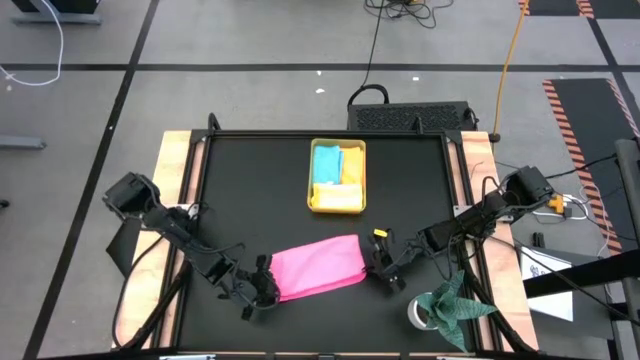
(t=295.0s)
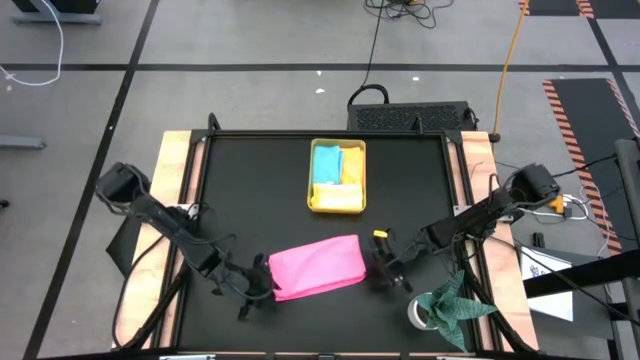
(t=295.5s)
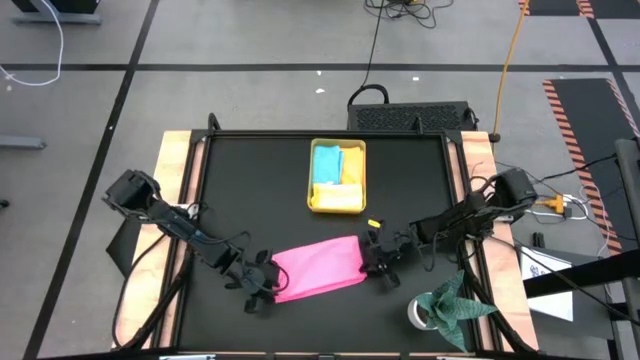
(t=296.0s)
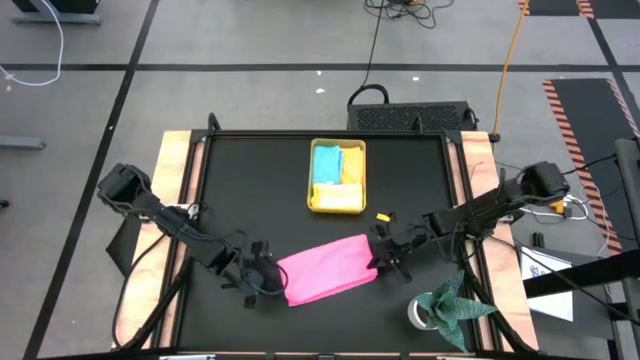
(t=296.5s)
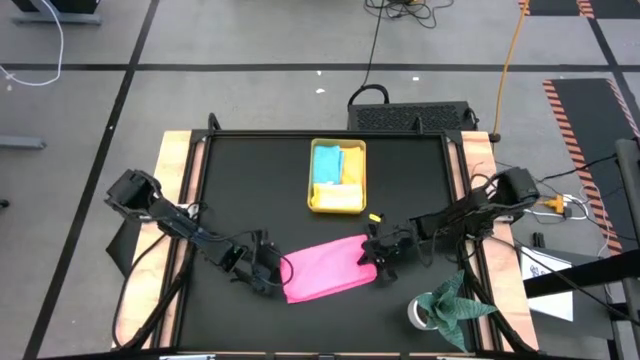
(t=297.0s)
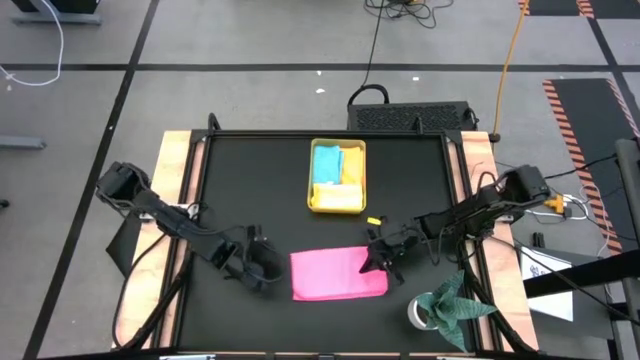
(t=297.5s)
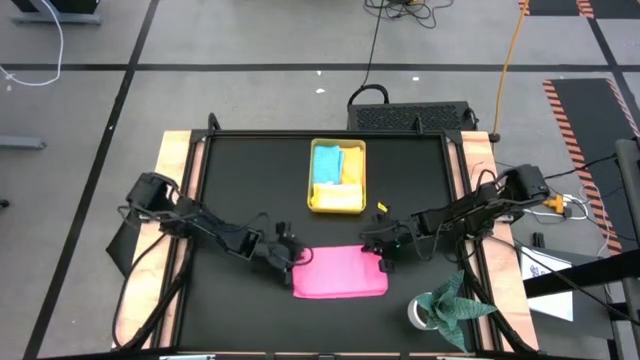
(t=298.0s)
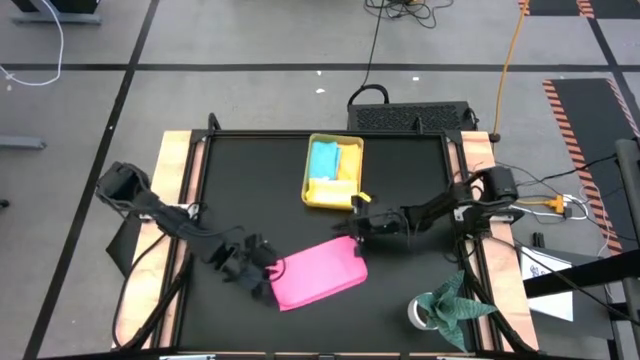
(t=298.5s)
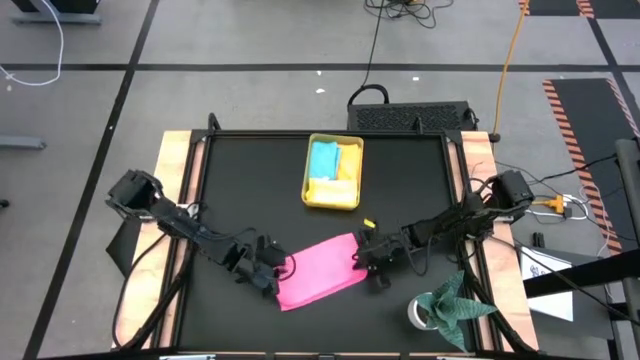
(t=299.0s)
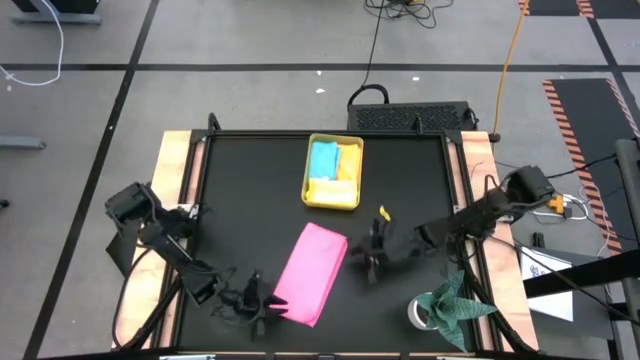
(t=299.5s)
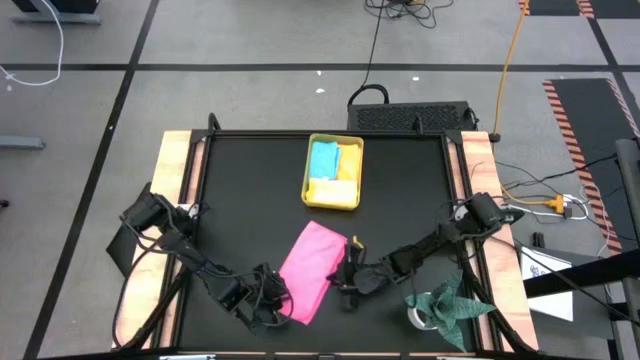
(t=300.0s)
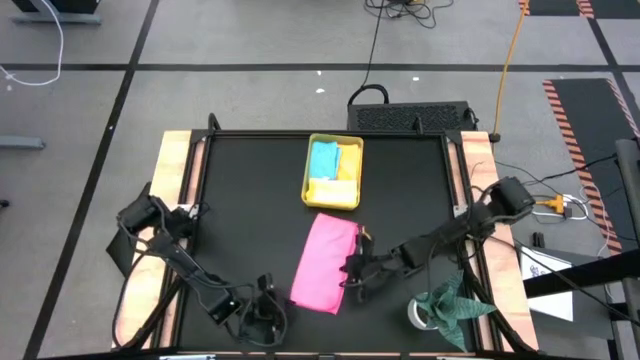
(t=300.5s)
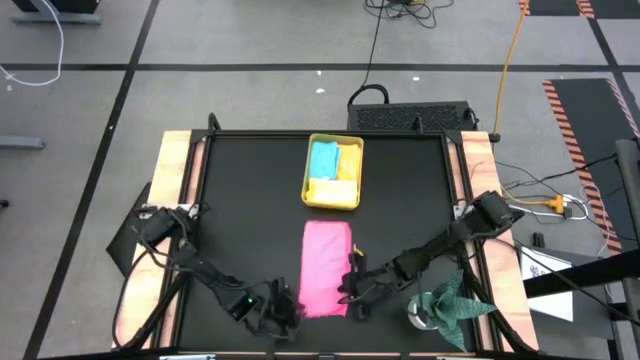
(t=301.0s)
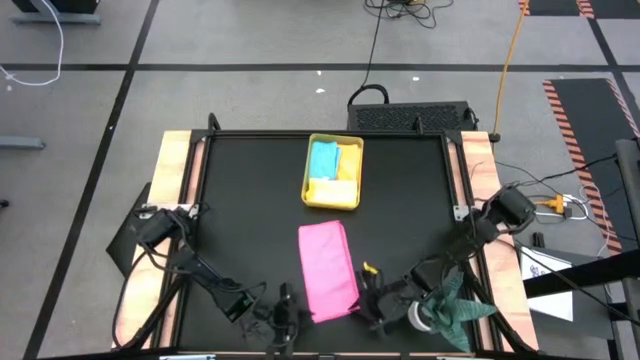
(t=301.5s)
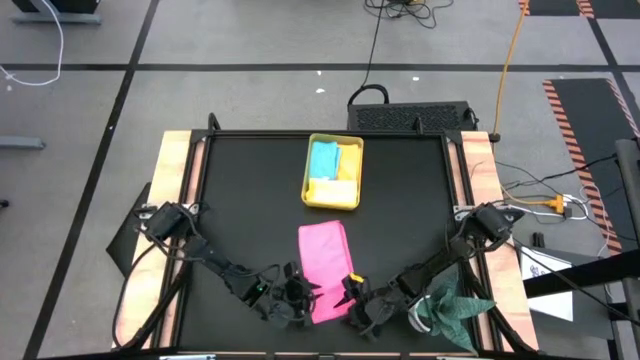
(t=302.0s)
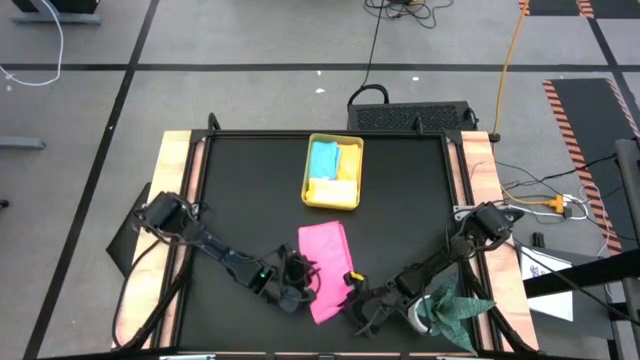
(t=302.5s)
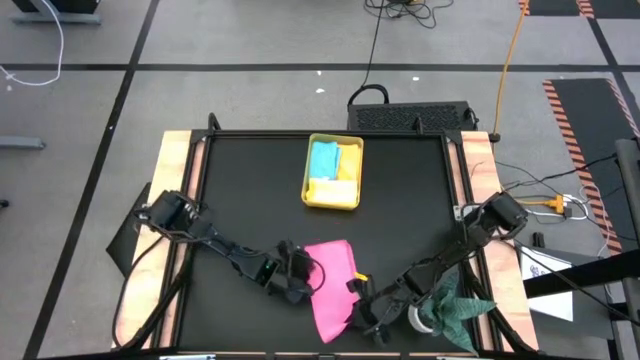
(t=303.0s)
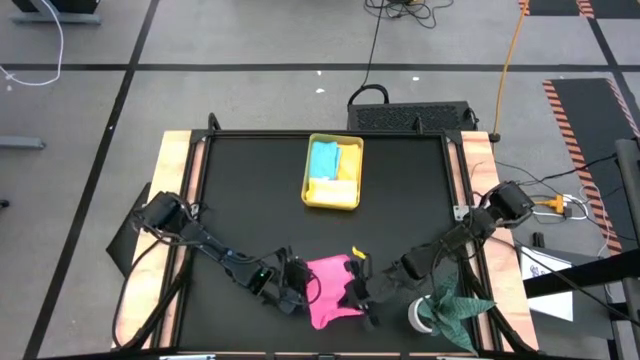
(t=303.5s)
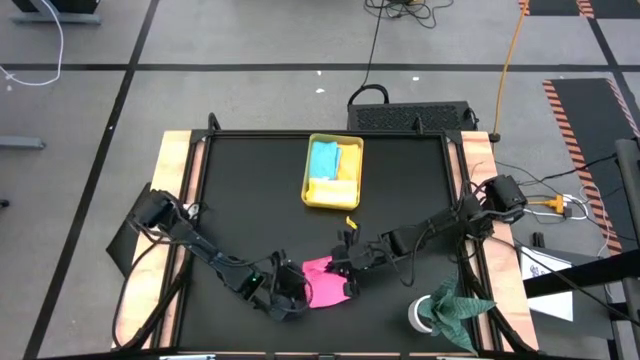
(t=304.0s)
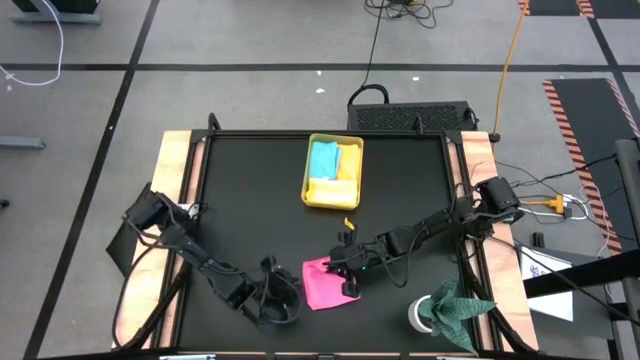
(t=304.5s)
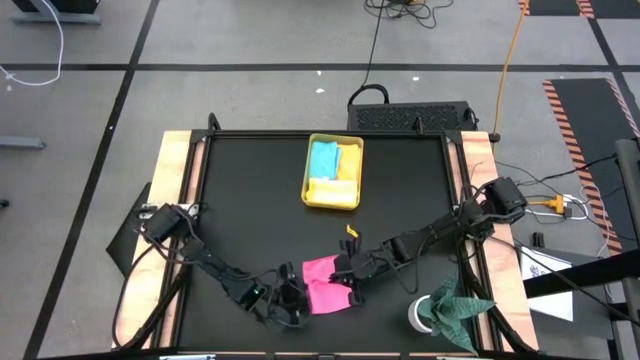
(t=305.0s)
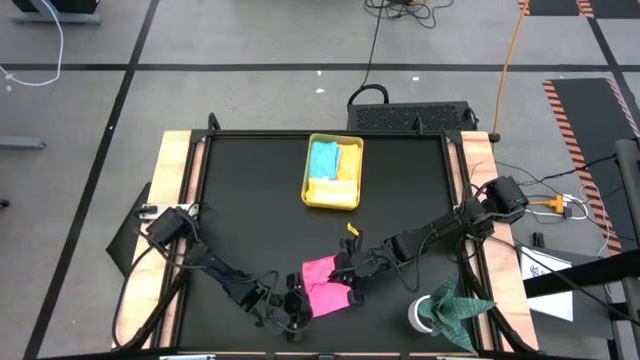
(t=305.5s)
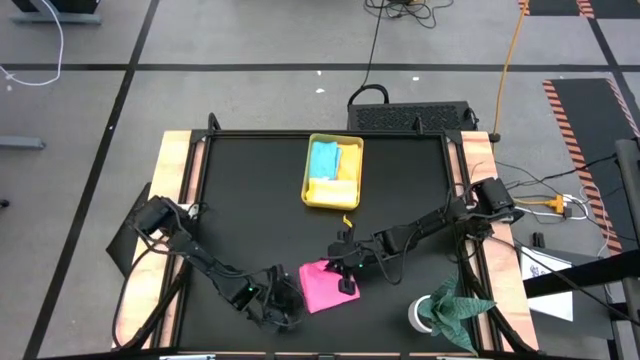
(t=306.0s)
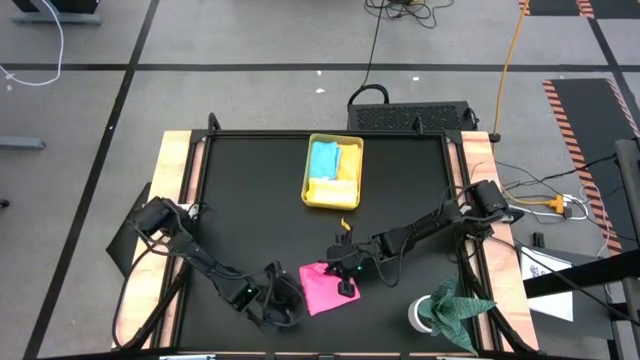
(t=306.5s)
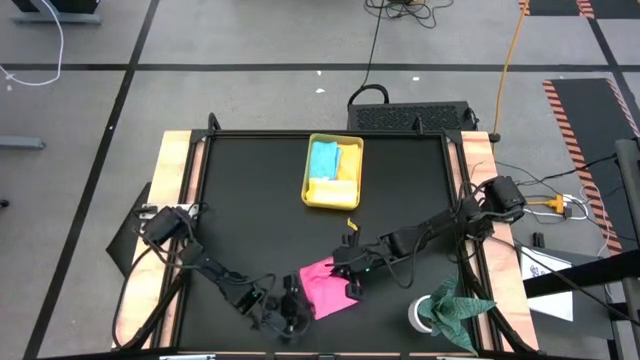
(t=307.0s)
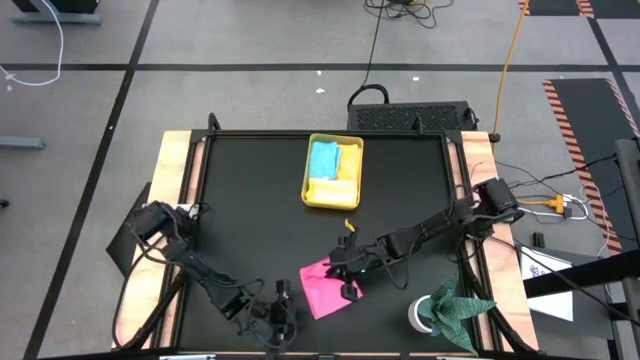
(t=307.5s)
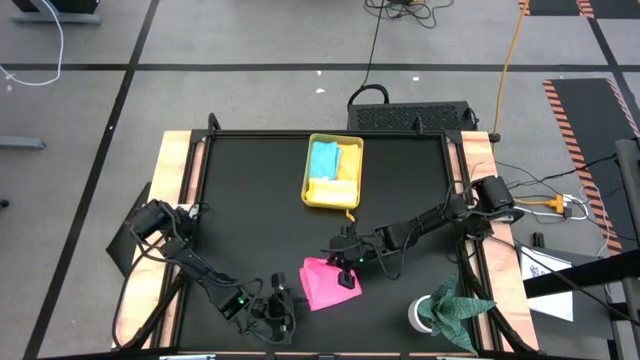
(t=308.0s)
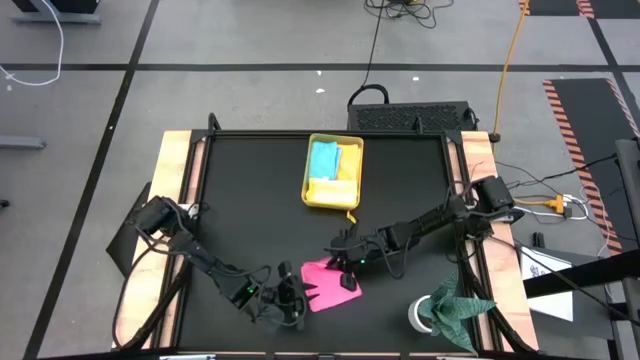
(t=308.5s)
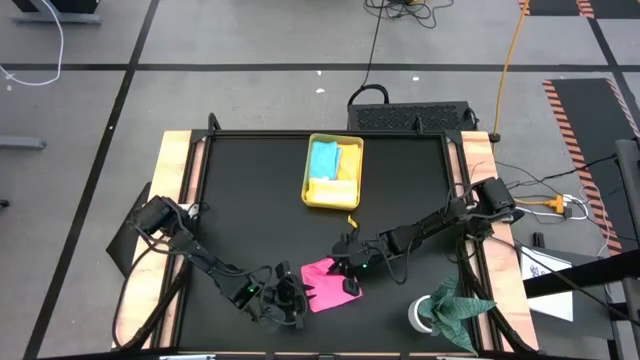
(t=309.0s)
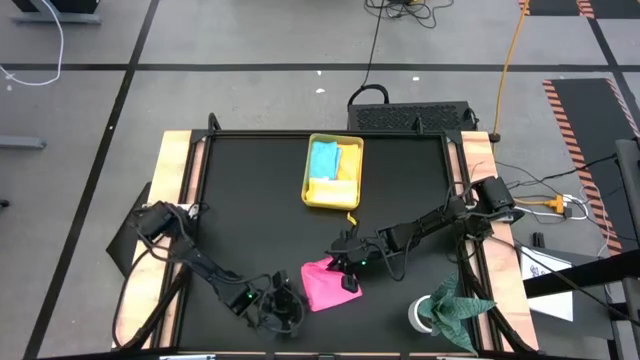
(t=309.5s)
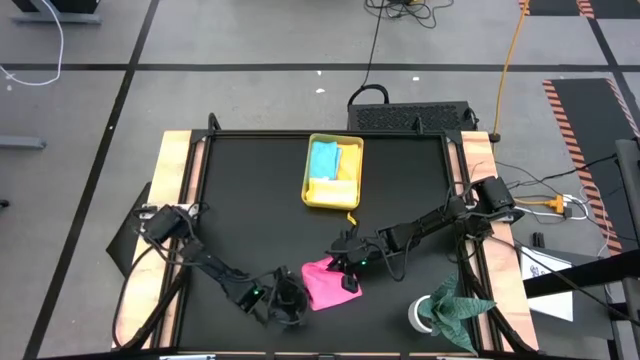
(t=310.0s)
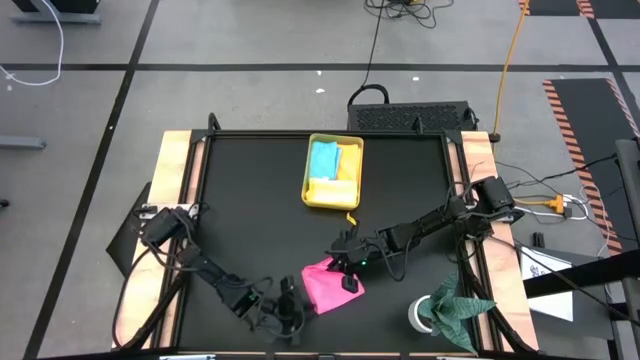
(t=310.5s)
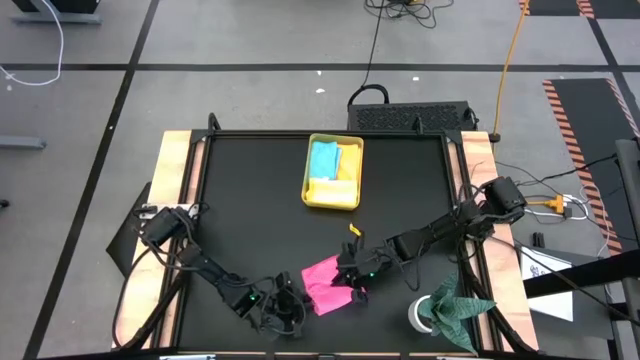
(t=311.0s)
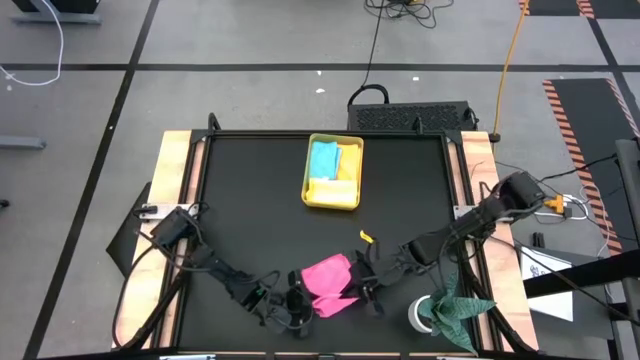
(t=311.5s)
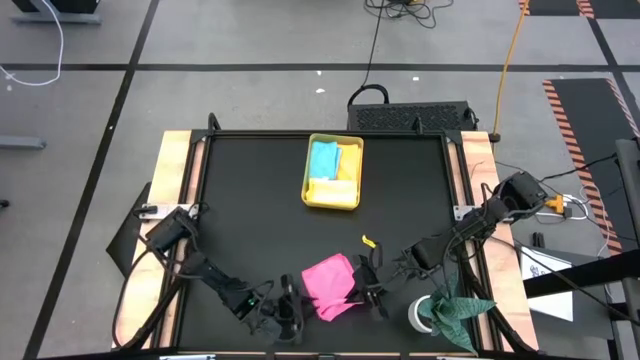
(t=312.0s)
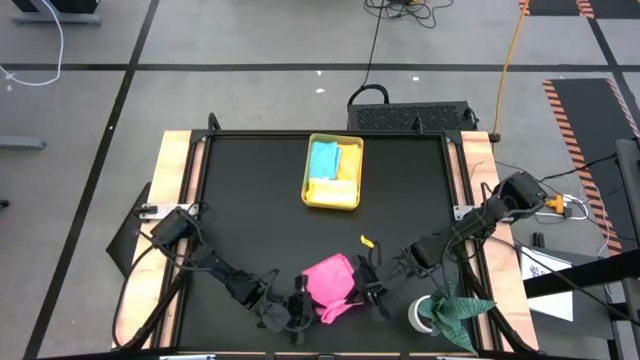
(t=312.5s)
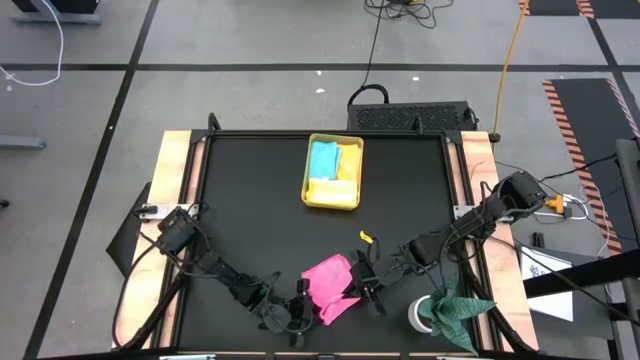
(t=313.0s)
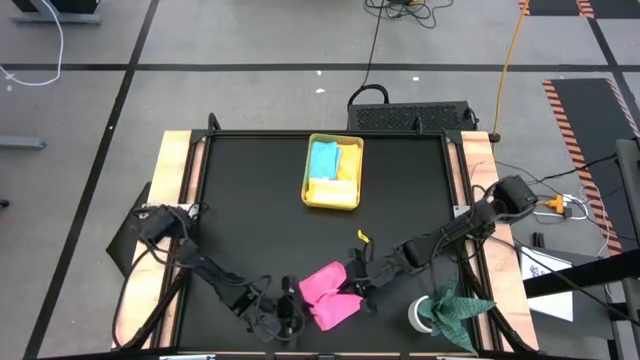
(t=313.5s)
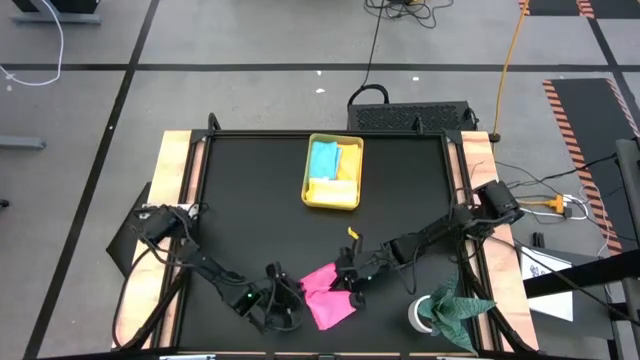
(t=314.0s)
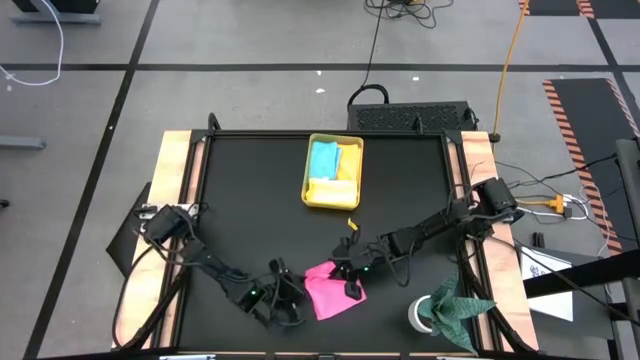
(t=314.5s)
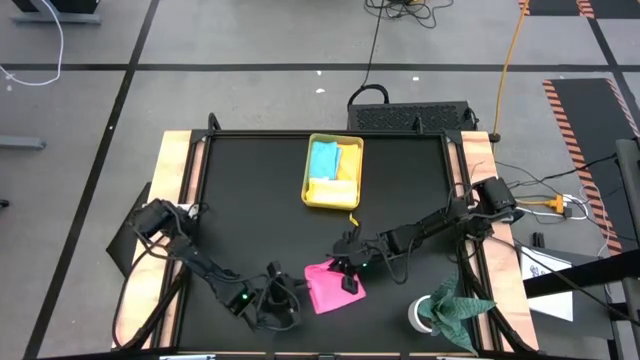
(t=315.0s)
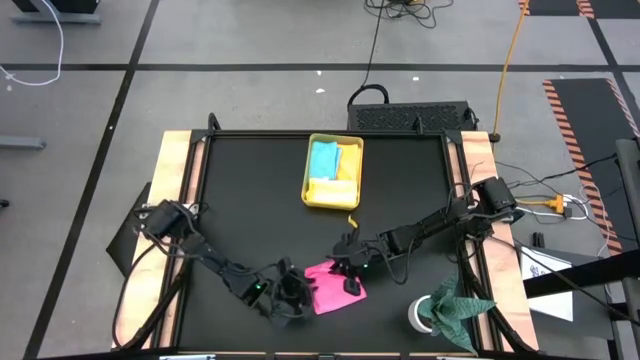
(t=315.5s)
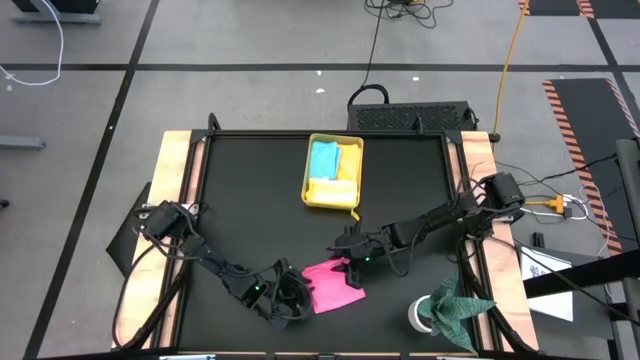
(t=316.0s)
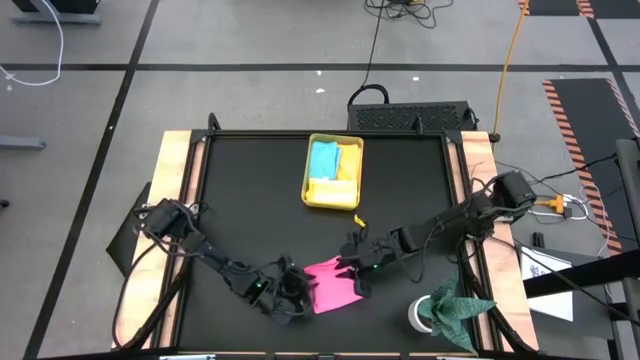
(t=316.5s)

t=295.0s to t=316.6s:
Task: Fold microfiber towels
Fold the pink towel
